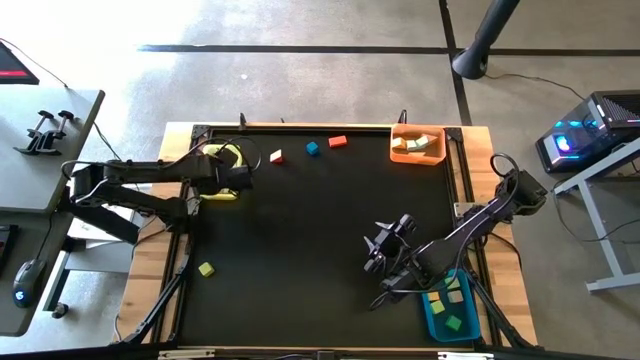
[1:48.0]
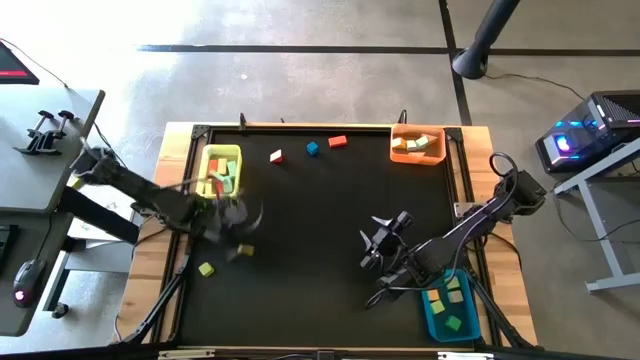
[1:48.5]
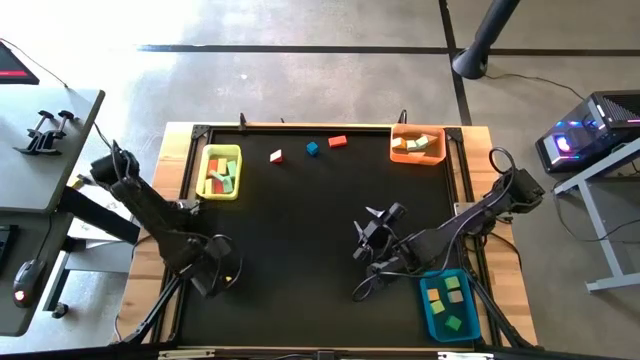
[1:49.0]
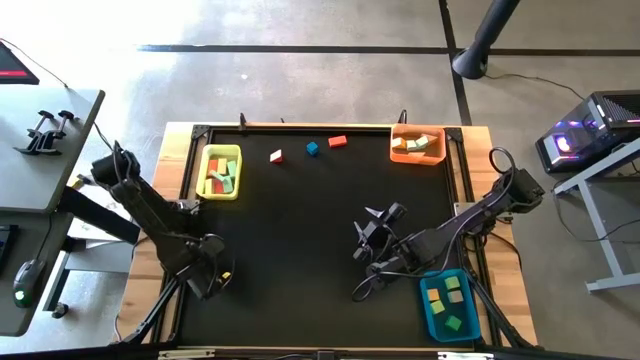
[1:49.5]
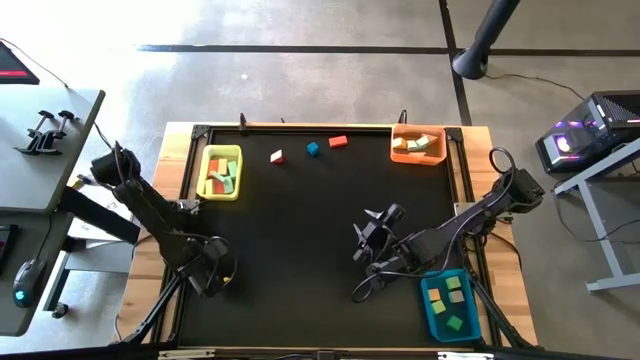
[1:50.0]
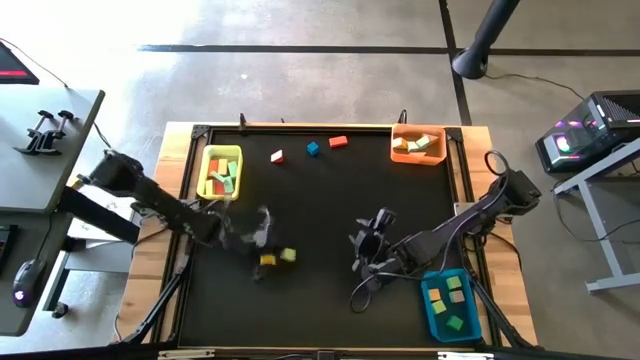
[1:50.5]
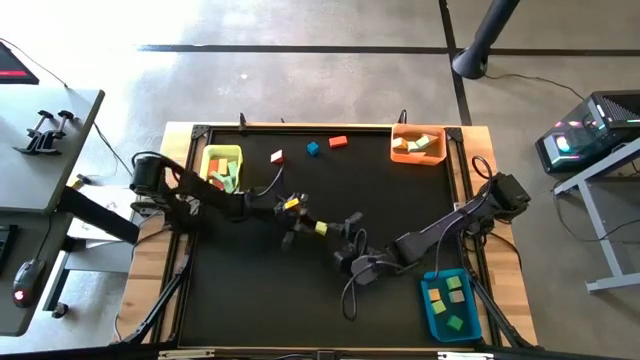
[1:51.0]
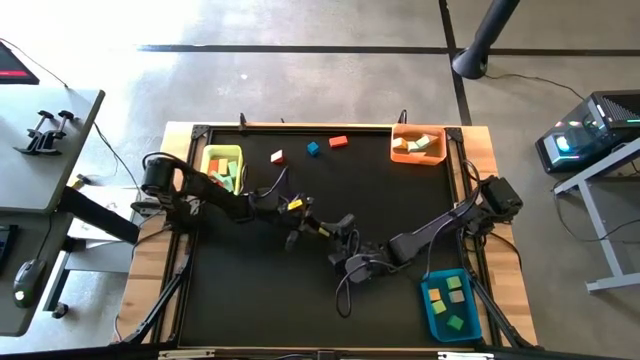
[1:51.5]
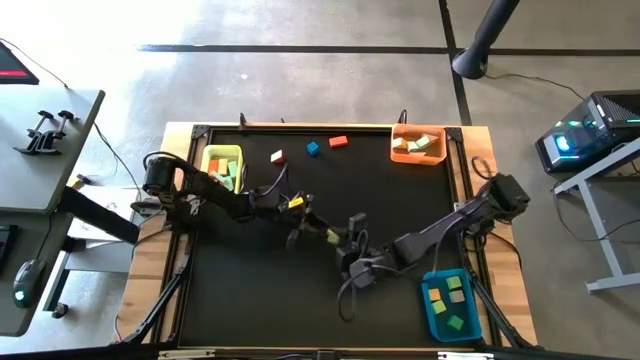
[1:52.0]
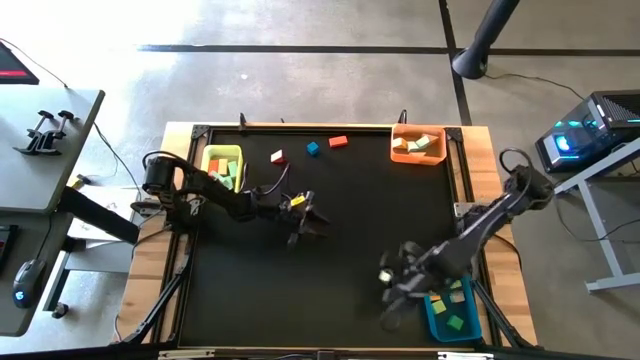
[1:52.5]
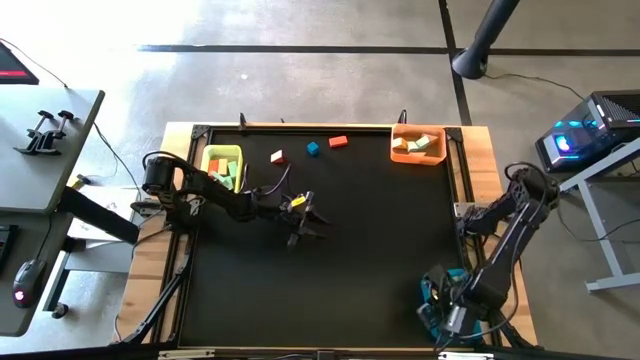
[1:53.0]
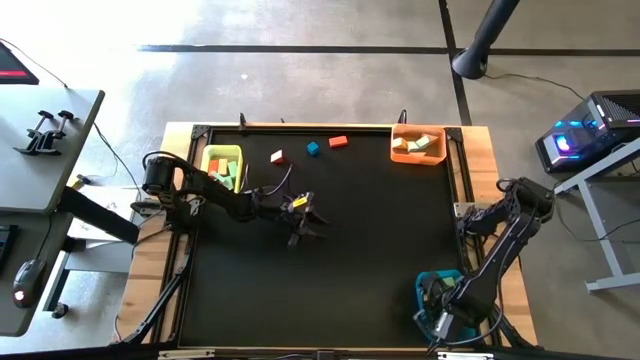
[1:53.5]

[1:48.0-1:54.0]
Task: Sort blocks by size
Put the yellow square block into the blue bin

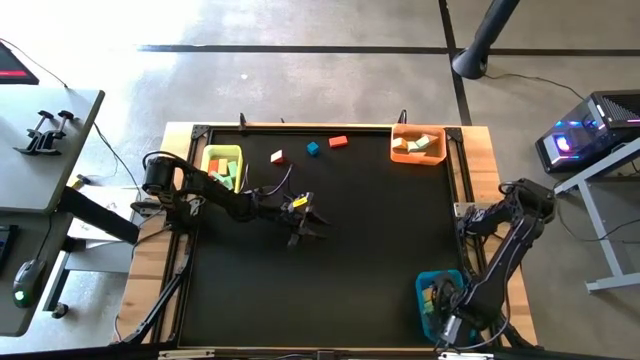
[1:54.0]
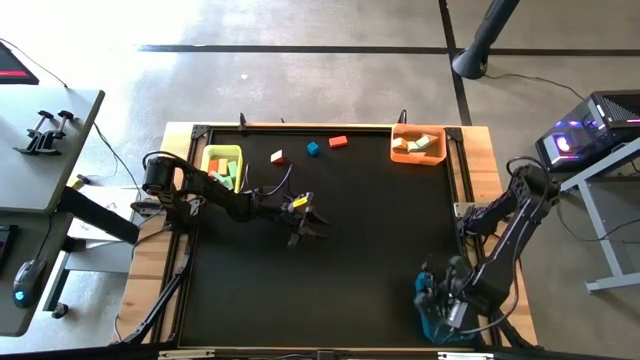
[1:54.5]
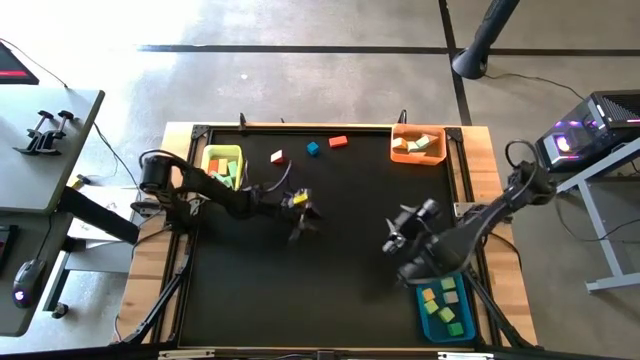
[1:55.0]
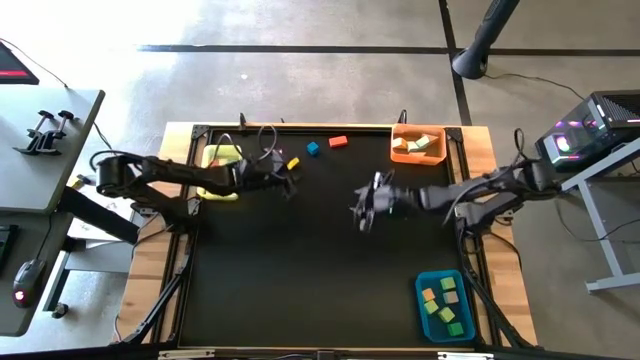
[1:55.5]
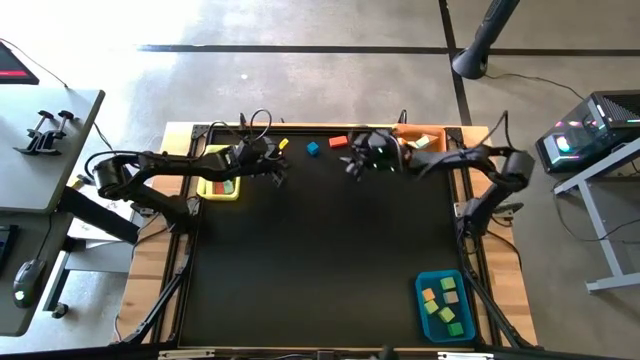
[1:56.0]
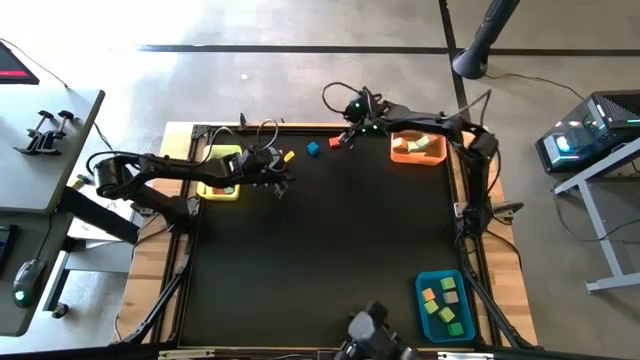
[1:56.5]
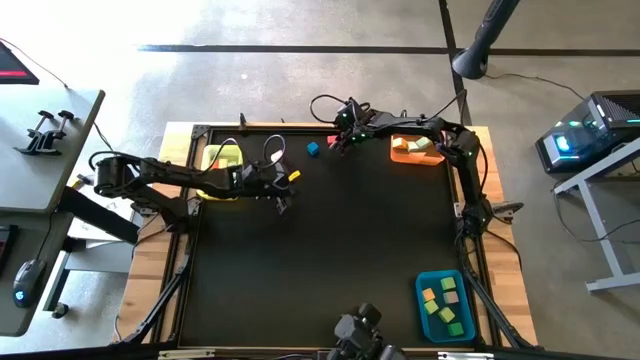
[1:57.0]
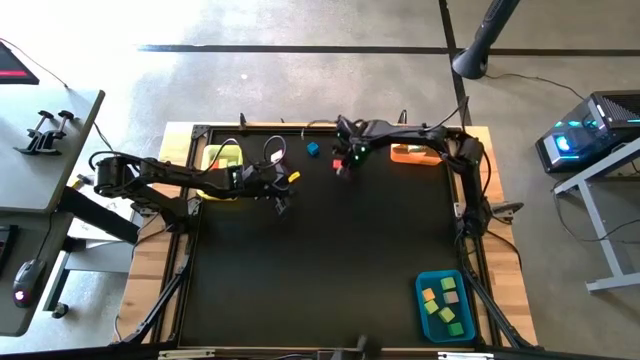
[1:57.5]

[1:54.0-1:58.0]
Put the orange rectangular block into the yellow bin

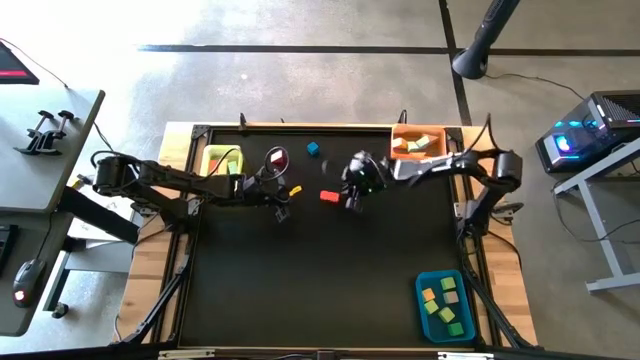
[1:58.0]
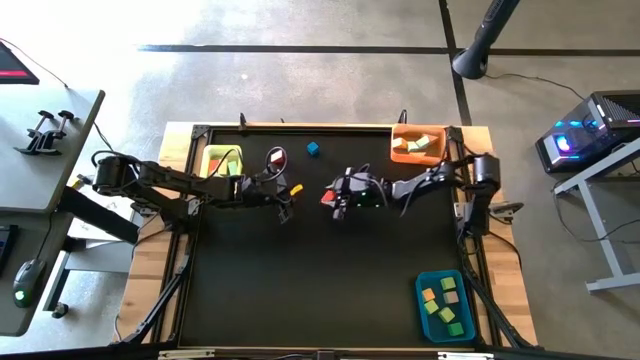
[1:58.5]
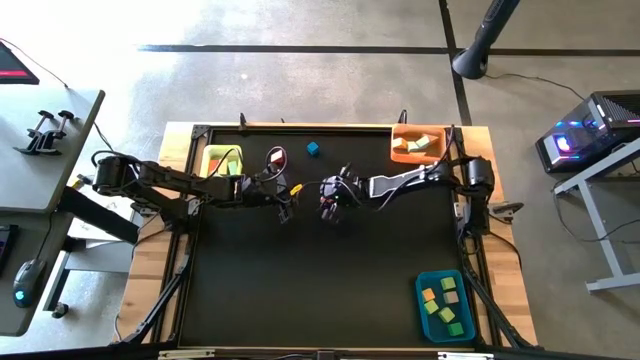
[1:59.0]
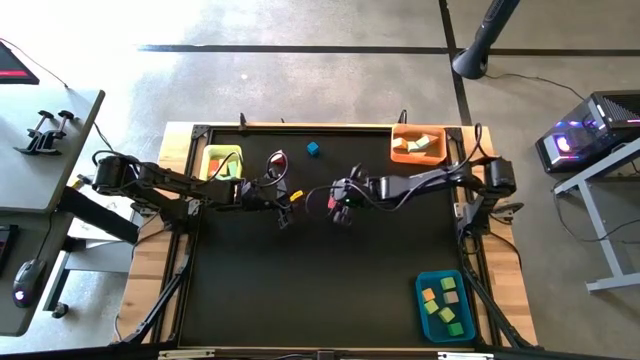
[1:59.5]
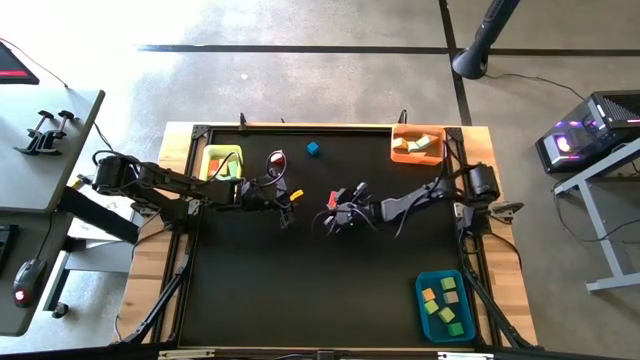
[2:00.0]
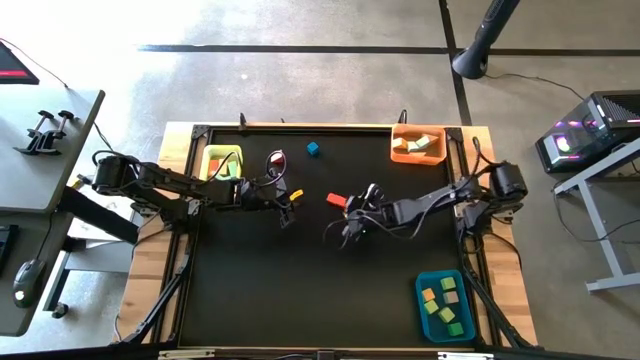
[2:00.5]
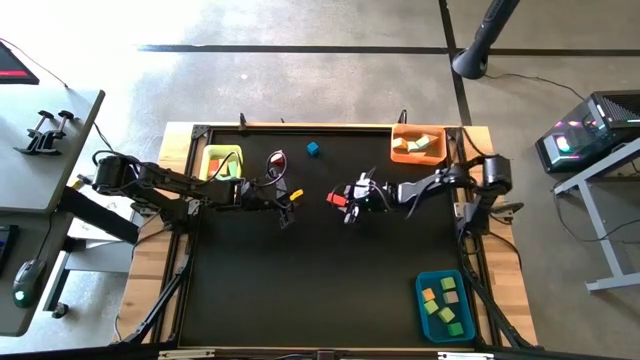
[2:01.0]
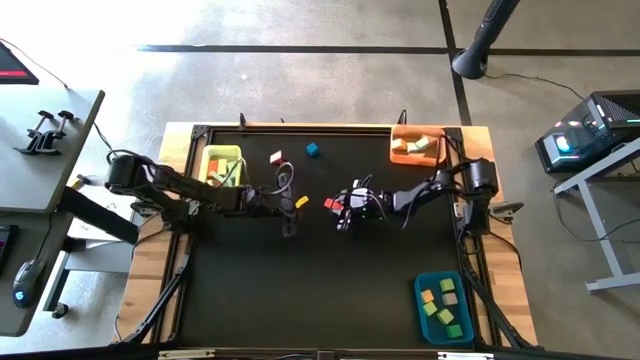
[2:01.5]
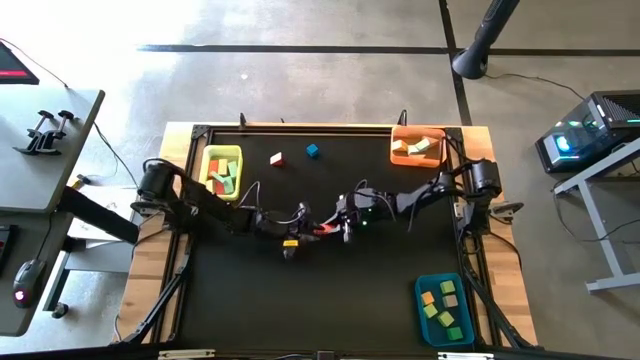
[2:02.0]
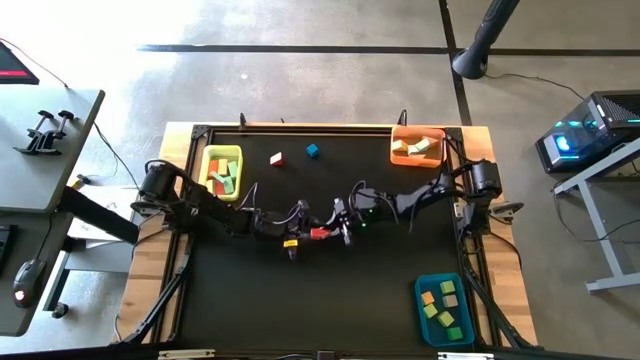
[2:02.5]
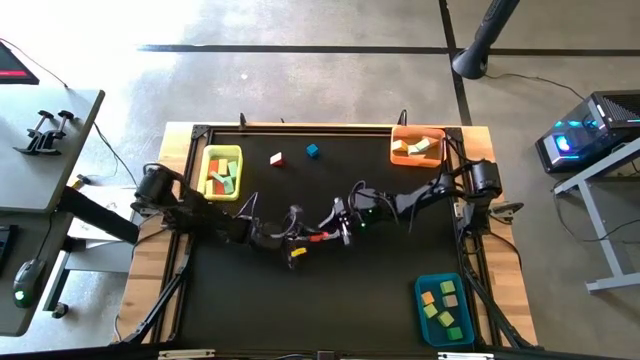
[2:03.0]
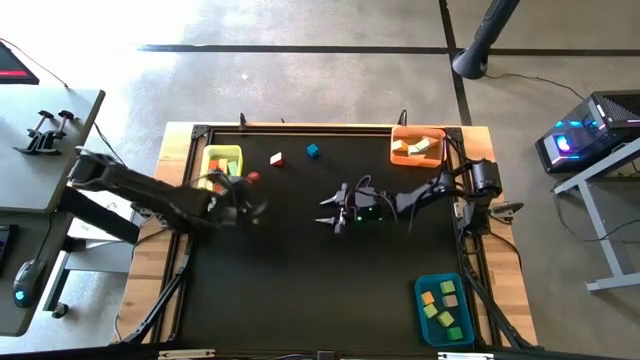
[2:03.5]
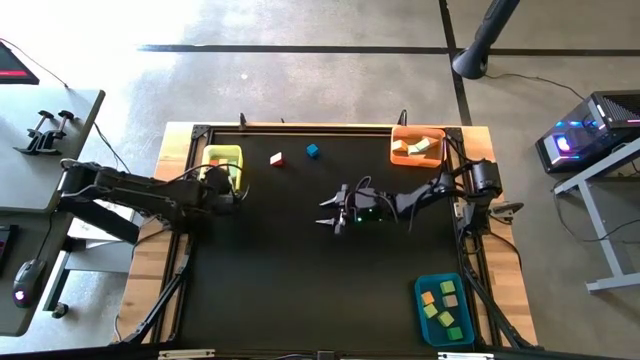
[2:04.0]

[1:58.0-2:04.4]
Put the orange rectangular block into the yellow bin

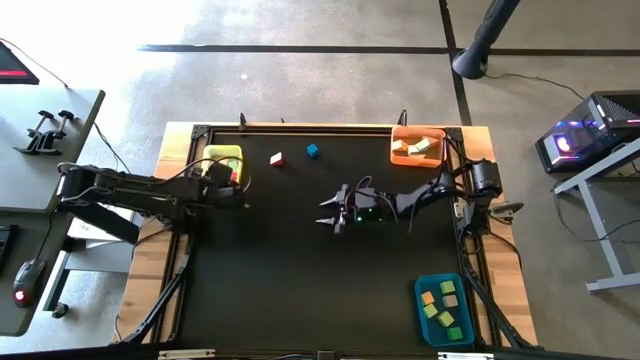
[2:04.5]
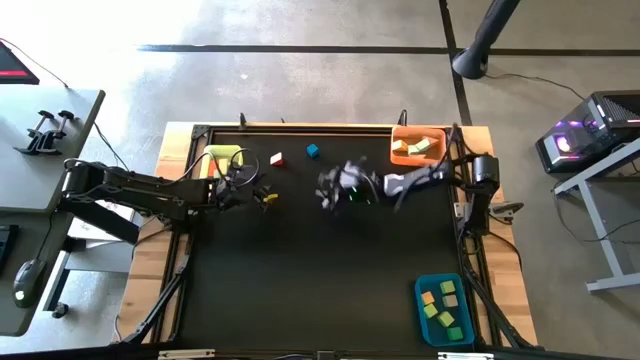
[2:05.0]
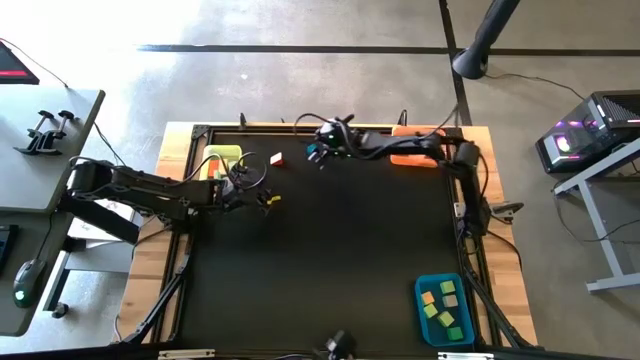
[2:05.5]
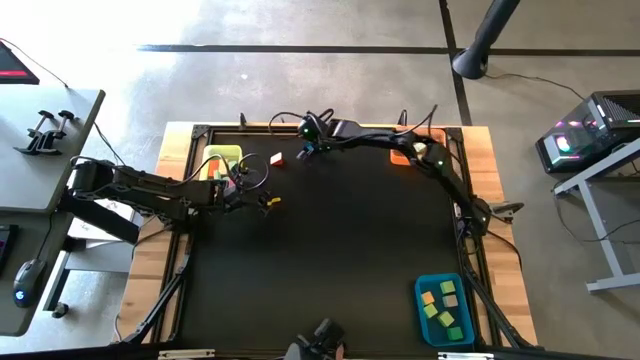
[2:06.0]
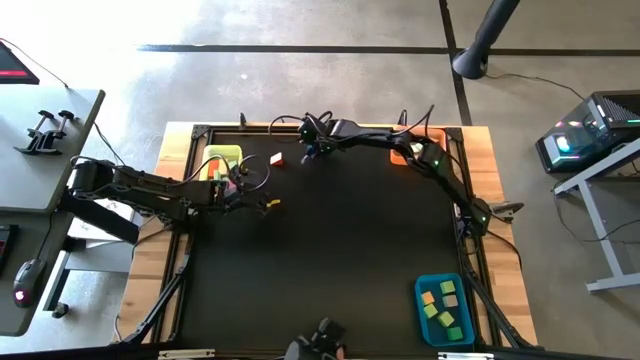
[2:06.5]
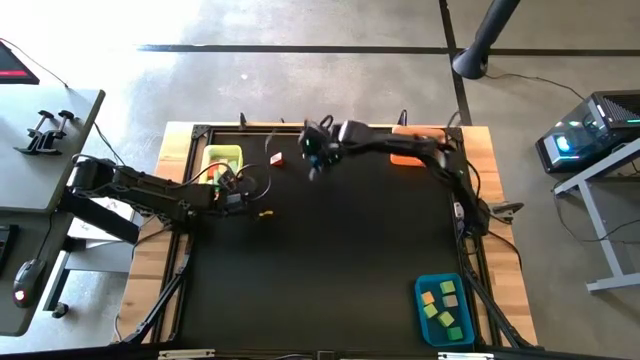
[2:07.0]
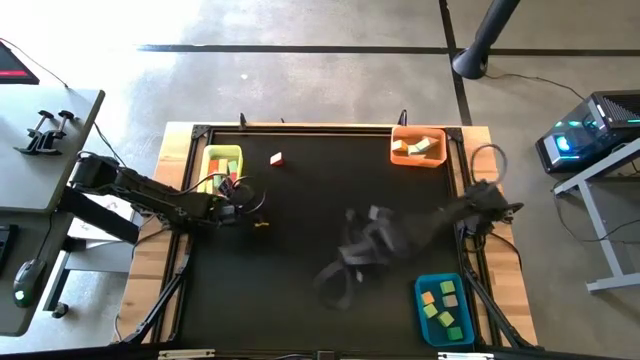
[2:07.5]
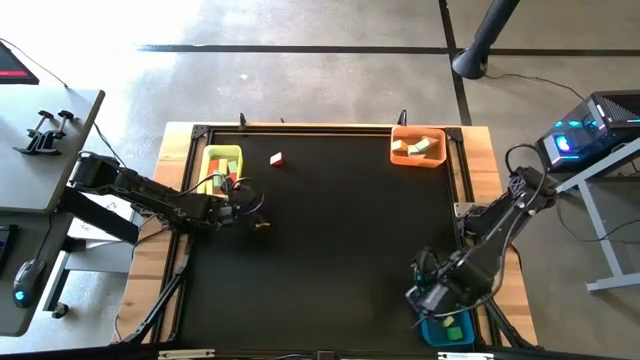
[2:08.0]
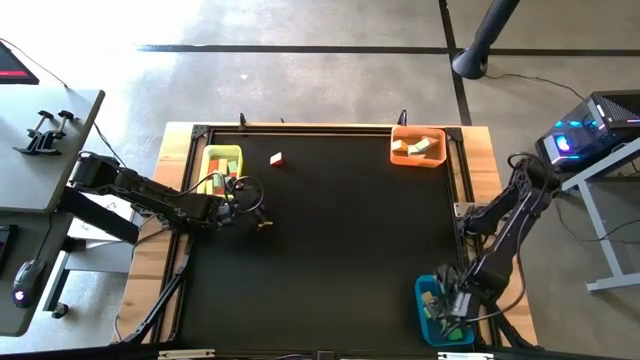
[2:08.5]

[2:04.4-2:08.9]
Put the blue square block into the blue bin

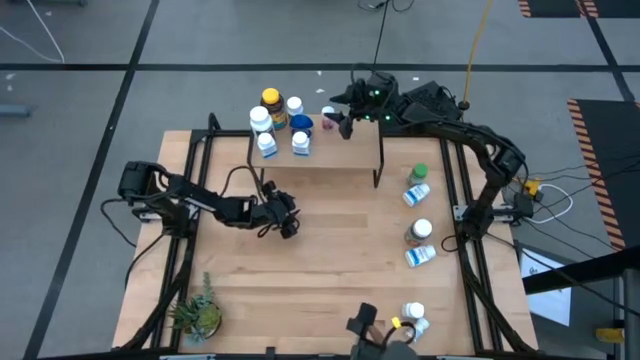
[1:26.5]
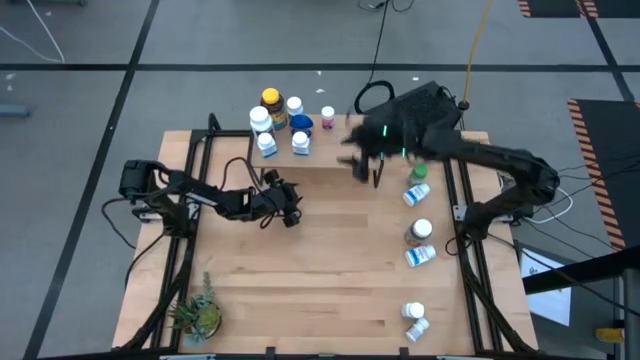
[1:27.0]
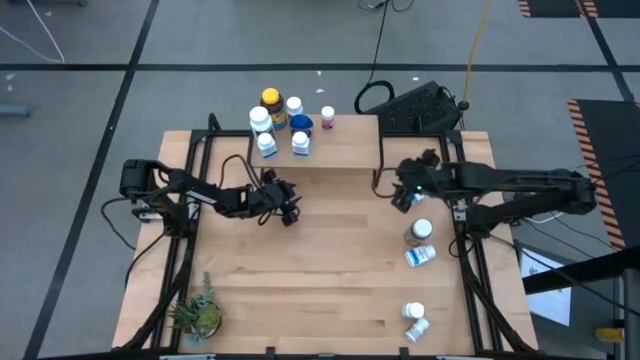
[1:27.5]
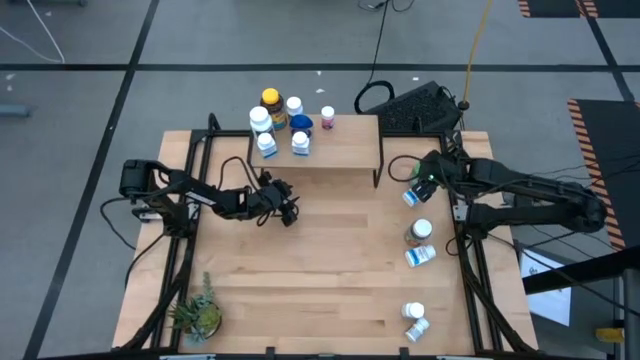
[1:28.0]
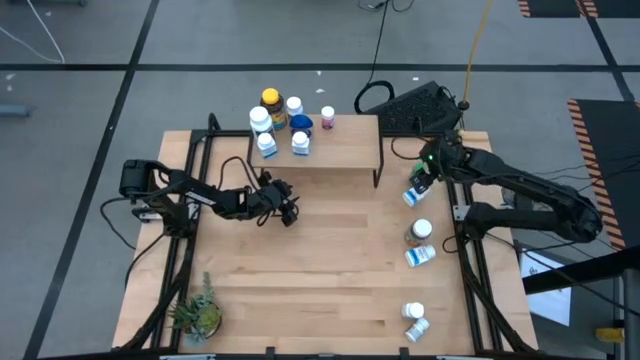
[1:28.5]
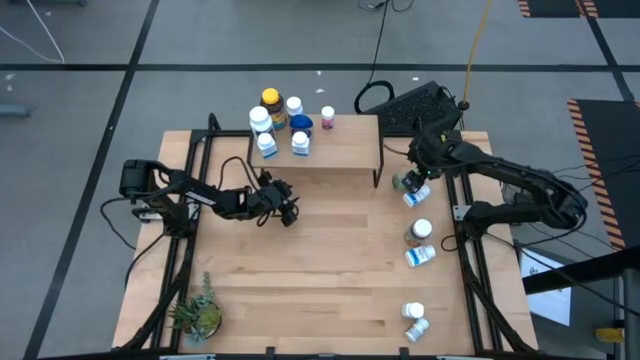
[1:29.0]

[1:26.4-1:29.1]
Task: Pick and place medicine bottles onto shelf by color
Put the green medicine bottle on the shelf
